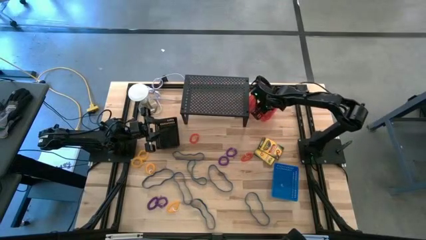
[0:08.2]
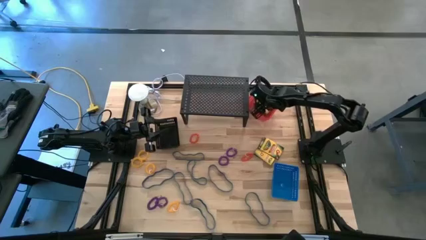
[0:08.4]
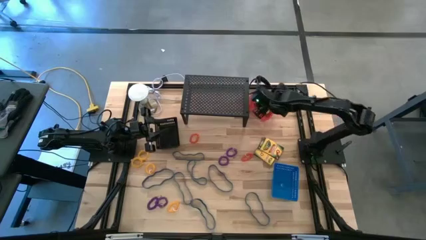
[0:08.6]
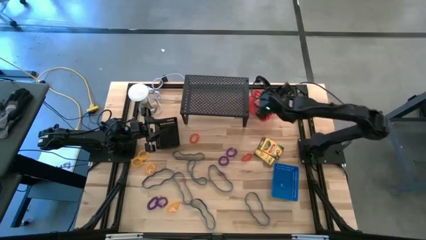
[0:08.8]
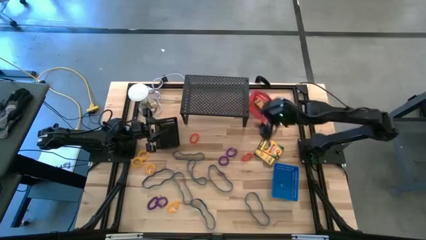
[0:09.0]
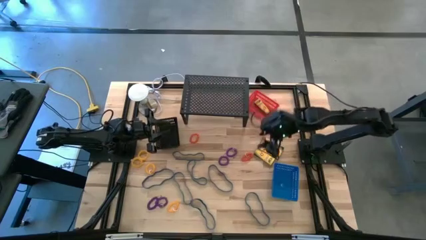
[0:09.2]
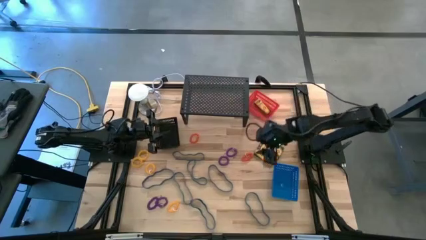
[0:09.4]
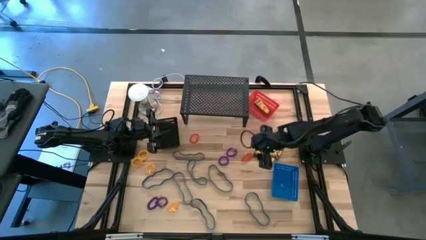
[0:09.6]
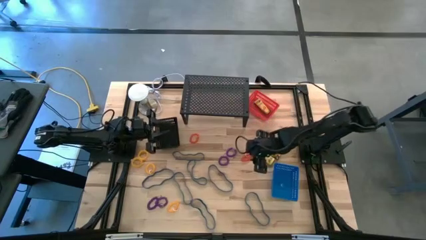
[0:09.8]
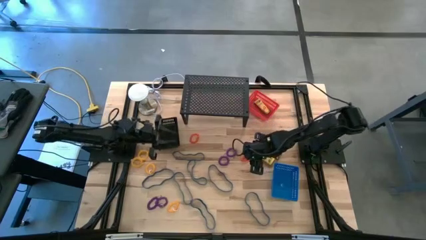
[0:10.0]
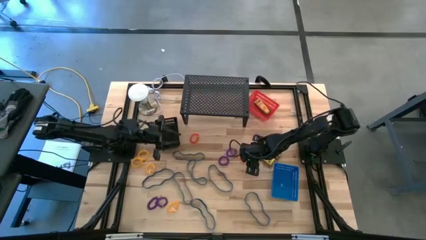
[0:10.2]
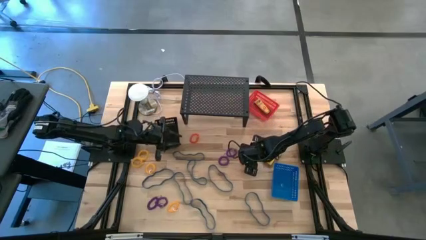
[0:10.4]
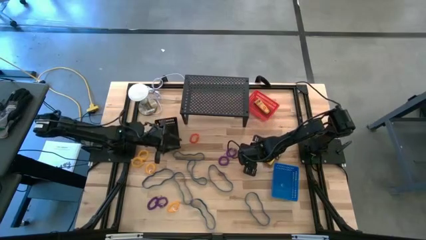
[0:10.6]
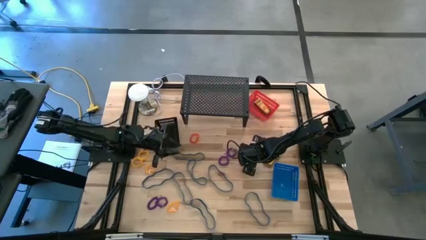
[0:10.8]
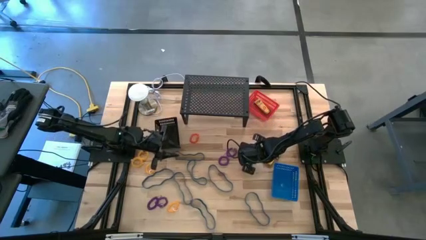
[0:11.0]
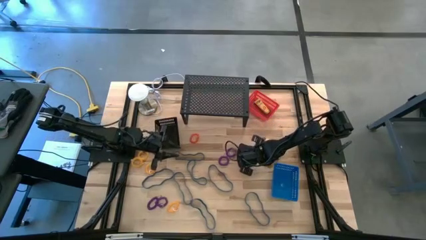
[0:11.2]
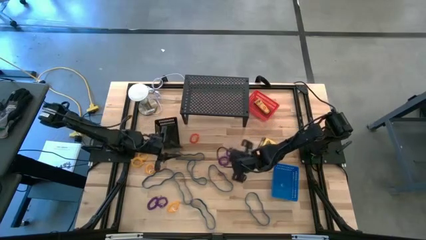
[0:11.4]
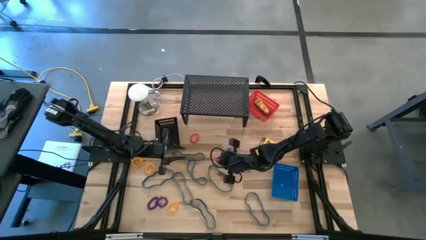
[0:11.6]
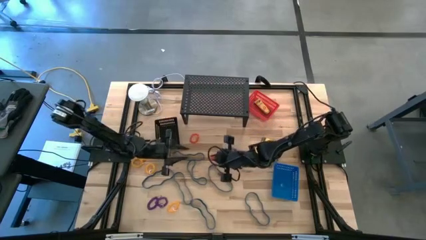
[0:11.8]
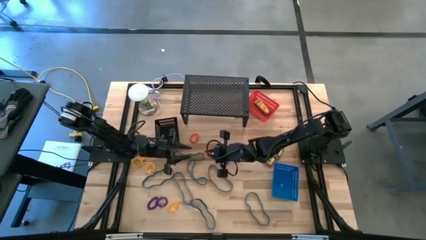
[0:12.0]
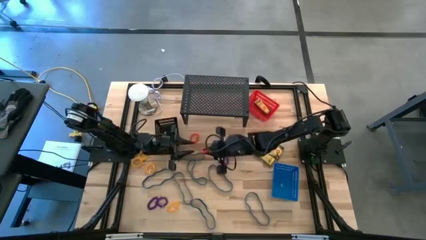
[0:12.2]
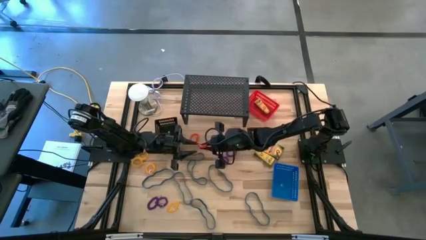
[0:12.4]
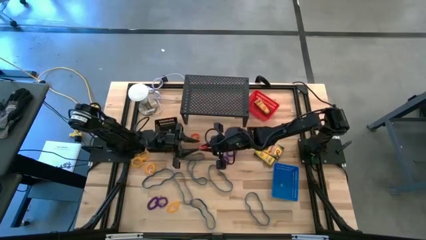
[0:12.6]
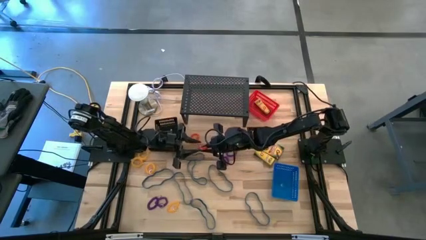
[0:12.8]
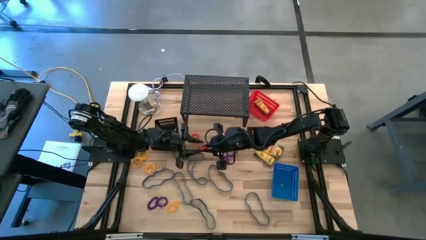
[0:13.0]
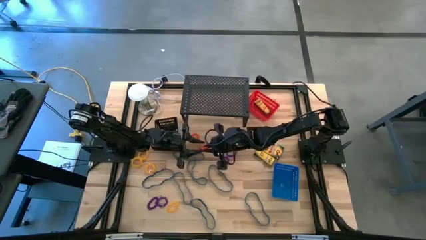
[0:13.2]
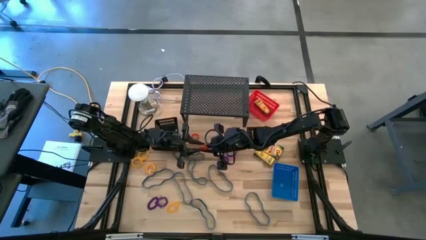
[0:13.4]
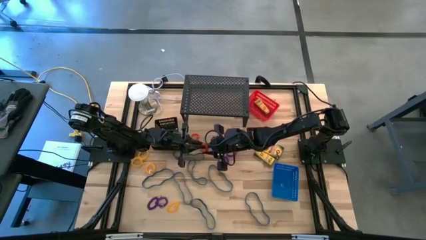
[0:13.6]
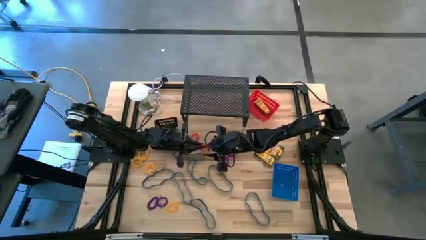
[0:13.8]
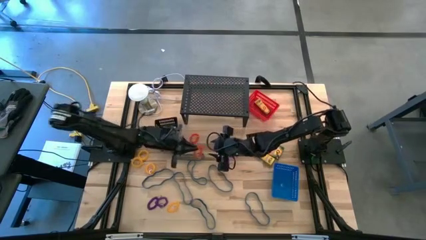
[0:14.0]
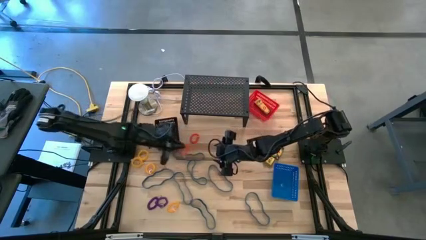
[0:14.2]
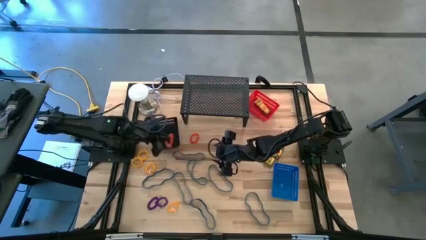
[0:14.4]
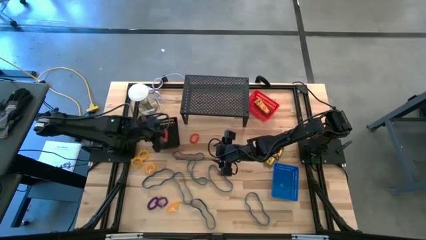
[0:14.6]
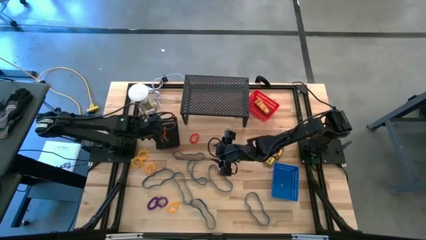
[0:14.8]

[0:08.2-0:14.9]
Task: Pick & Place Office Desk Supplies
Put the orange spring keychain into the black basket

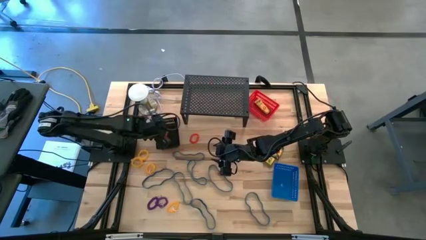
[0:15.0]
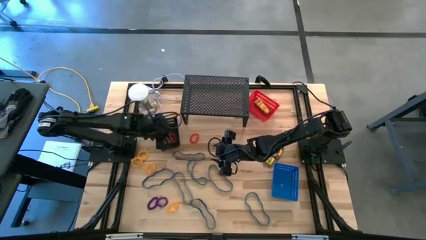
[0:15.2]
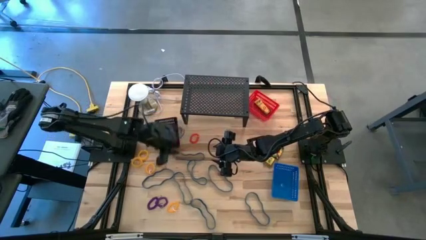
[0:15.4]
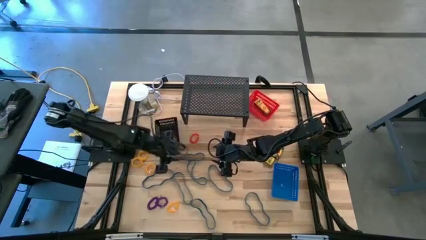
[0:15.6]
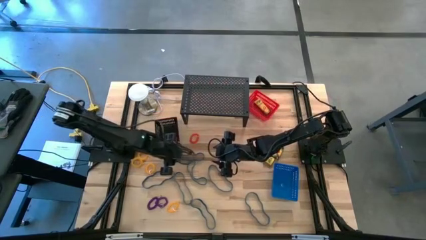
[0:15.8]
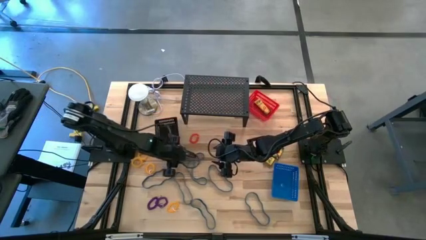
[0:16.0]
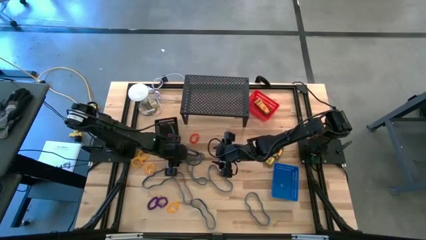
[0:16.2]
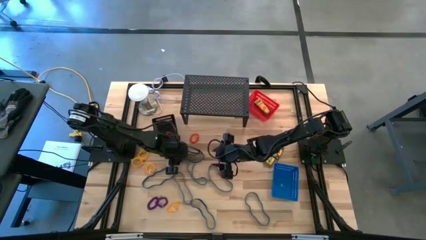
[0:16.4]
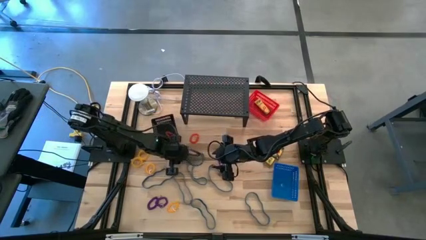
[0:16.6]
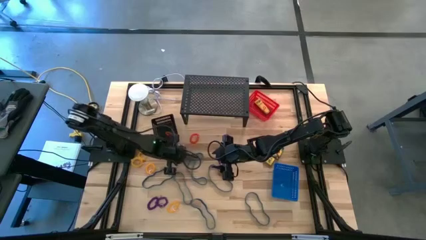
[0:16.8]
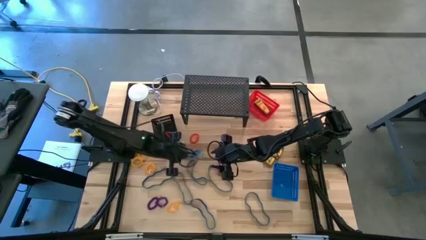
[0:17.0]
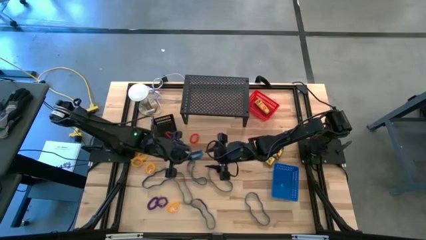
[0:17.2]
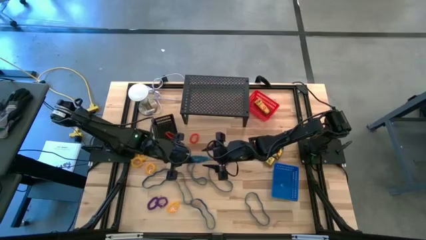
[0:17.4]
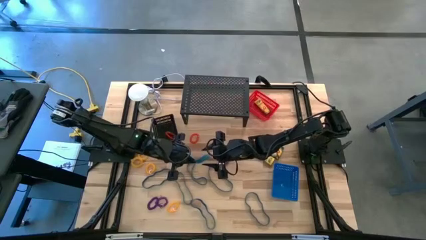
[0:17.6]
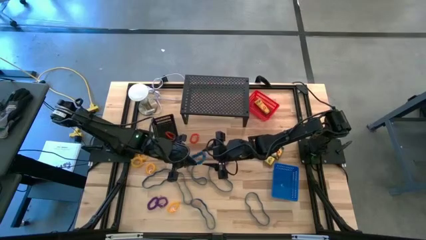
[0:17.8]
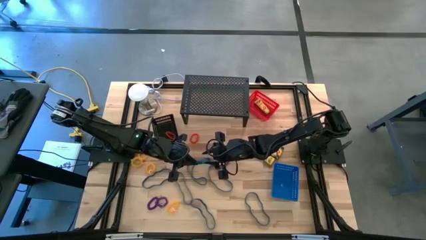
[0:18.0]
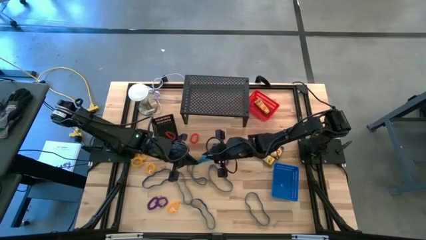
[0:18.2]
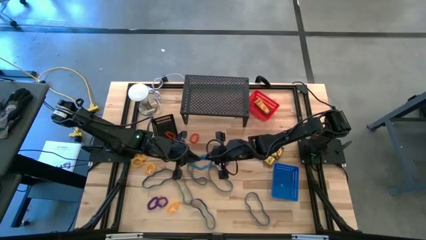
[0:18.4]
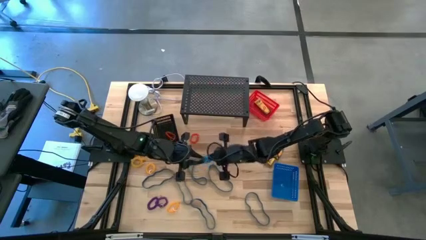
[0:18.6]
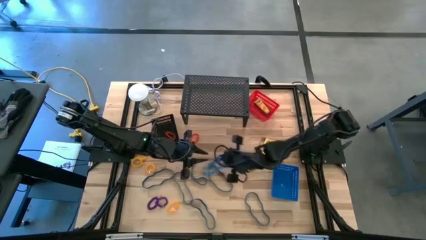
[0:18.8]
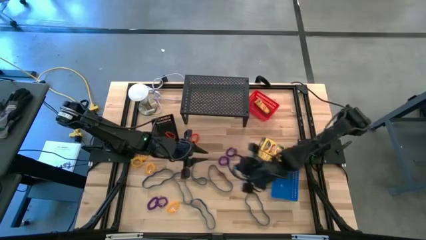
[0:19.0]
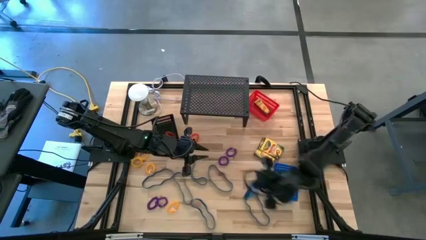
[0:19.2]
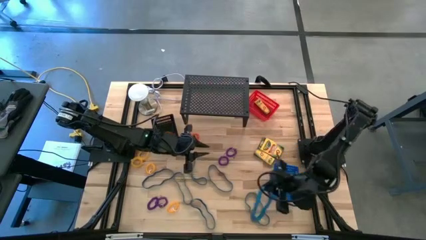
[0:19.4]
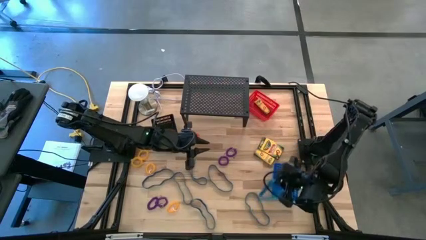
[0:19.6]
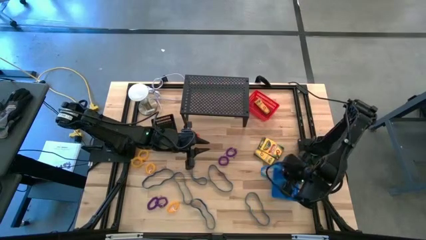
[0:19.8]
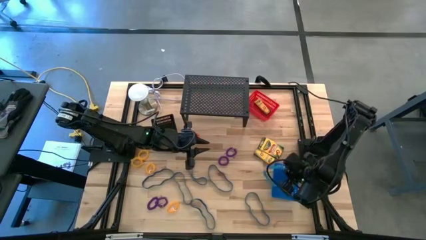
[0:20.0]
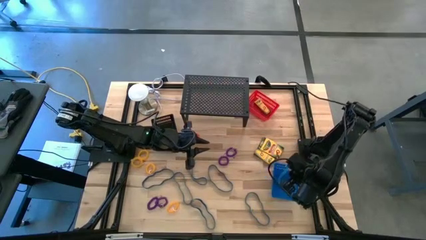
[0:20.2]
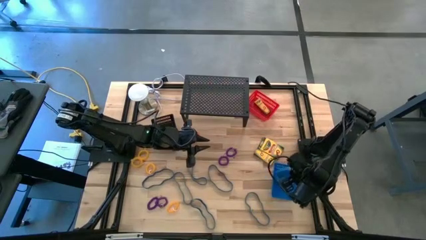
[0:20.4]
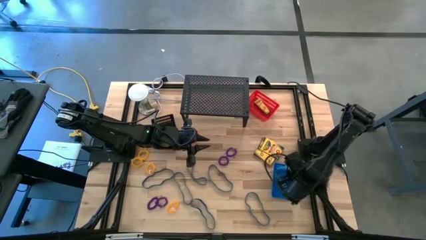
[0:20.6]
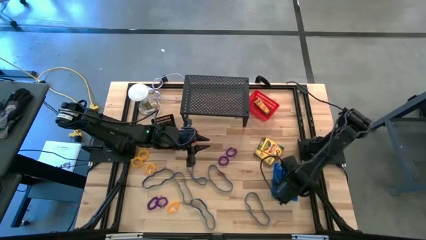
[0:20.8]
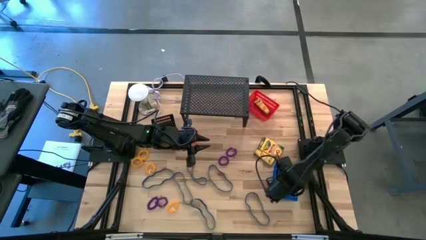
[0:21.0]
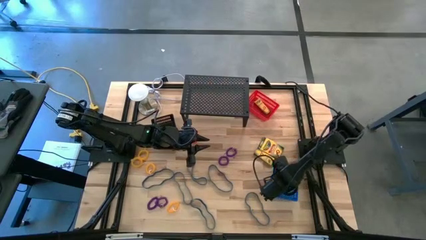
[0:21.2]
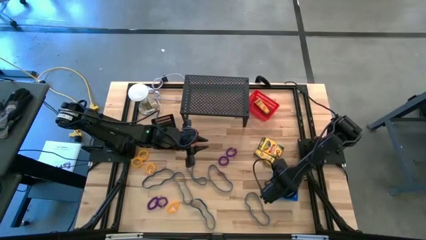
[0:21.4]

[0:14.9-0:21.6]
Put the blue rubber band into the blue basket

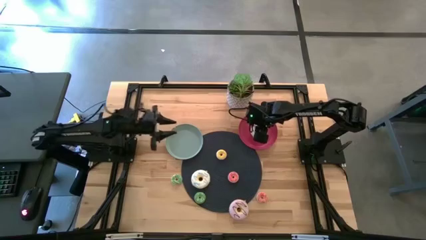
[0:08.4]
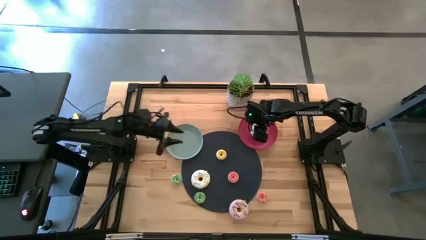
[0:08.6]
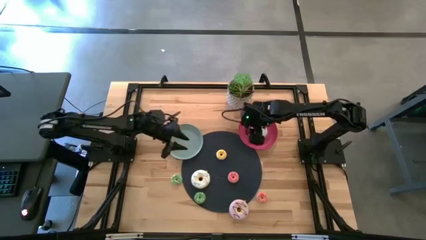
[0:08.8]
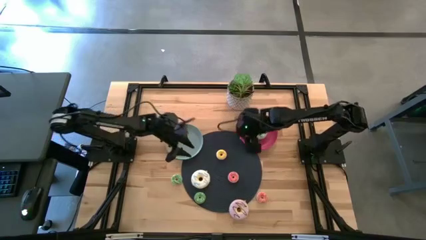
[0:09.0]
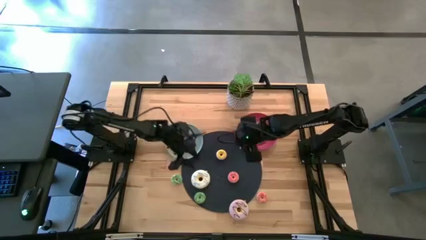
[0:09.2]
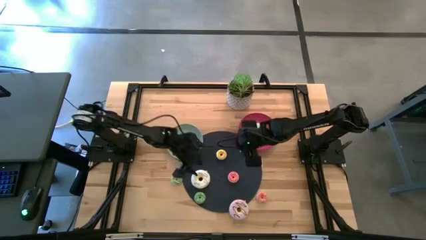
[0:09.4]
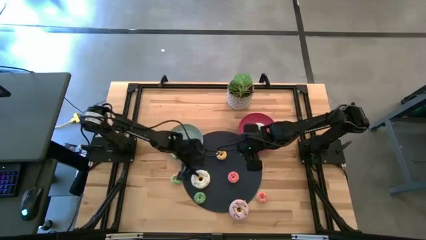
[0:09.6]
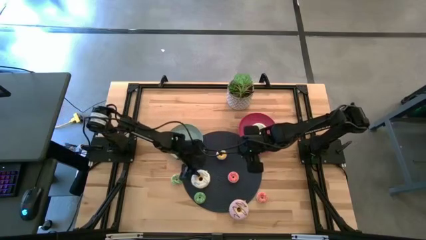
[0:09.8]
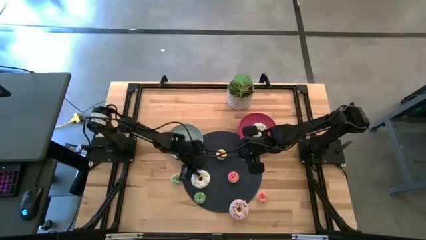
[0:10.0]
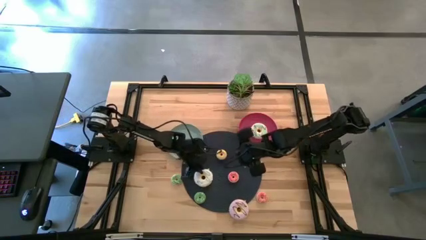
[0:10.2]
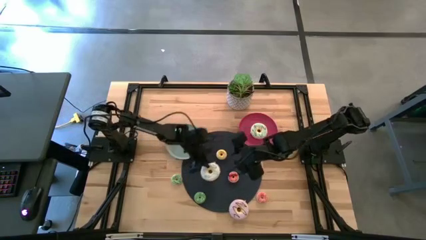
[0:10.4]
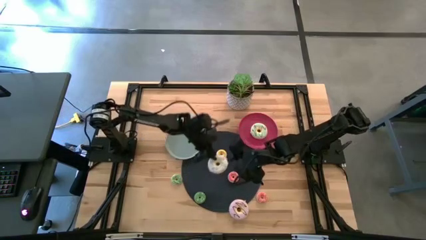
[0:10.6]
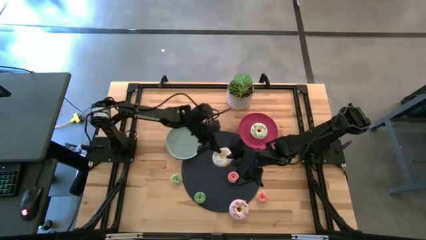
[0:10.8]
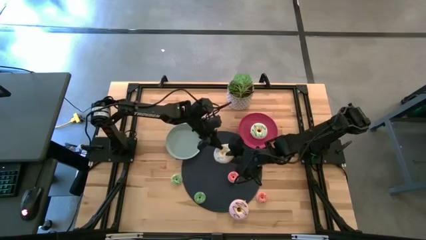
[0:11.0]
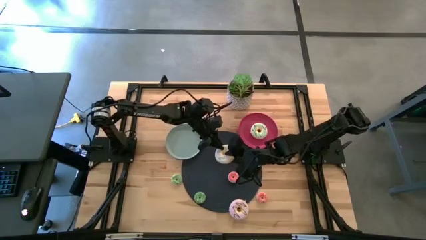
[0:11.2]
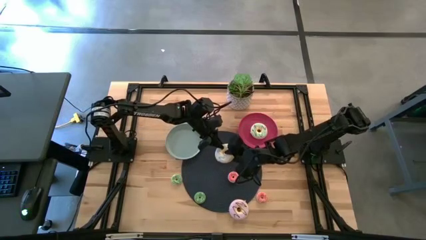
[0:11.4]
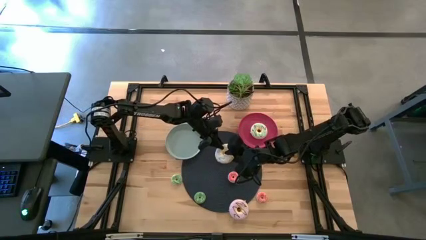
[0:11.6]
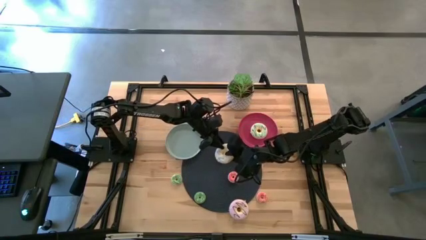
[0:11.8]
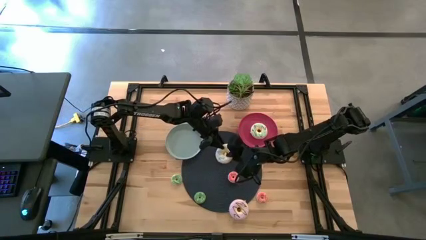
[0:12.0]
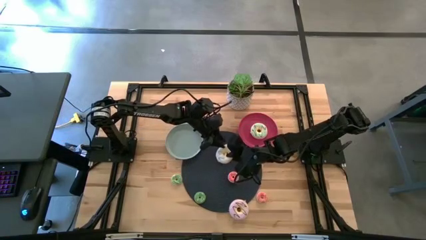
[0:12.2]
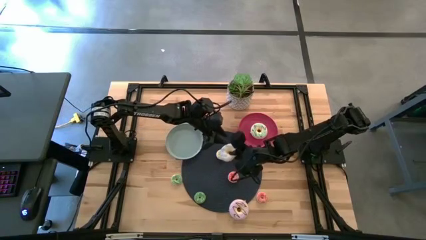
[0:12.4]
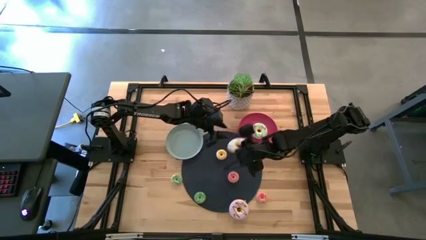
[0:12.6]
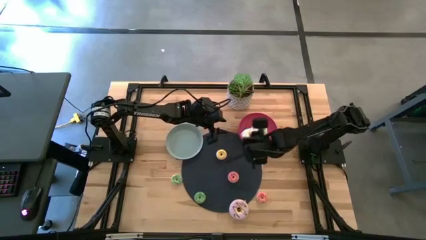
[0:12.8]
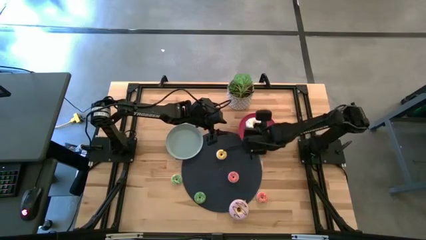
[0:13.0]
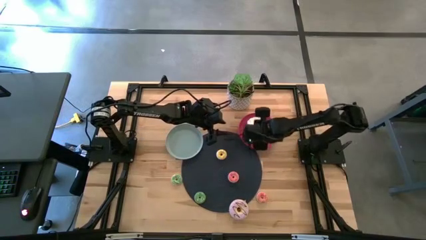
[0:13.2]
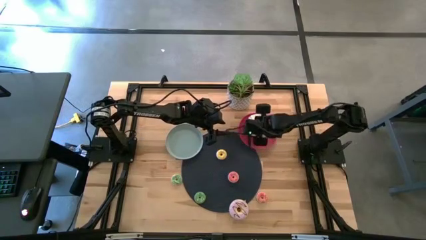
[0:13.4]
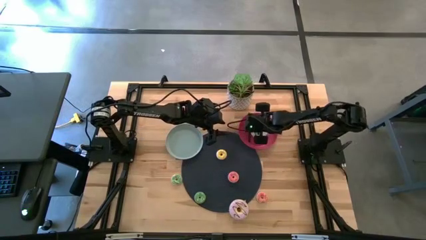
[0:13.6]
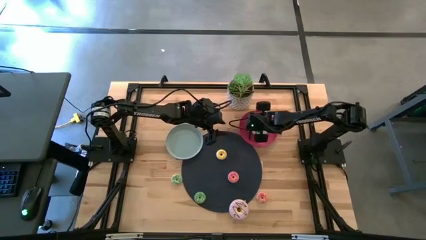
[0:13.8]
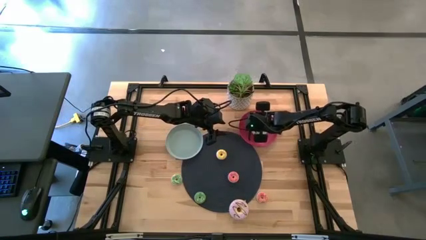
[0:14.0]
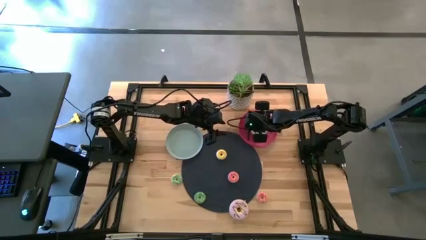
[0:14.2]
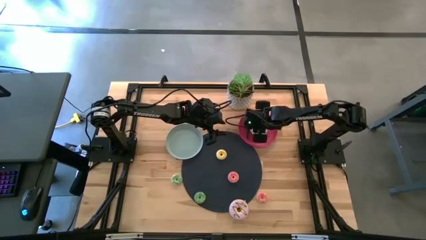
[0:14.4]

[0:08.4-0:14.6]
Task: Pick & Place donuts
Put the big white doughnut on the red plate
